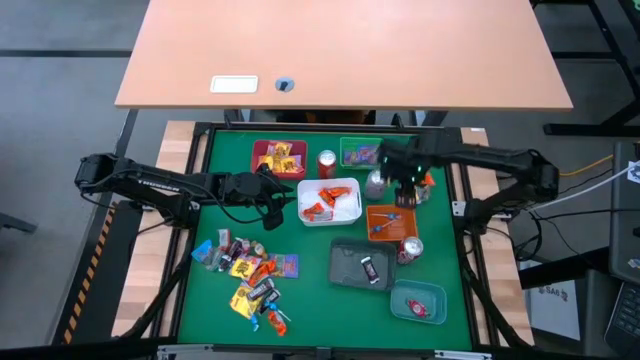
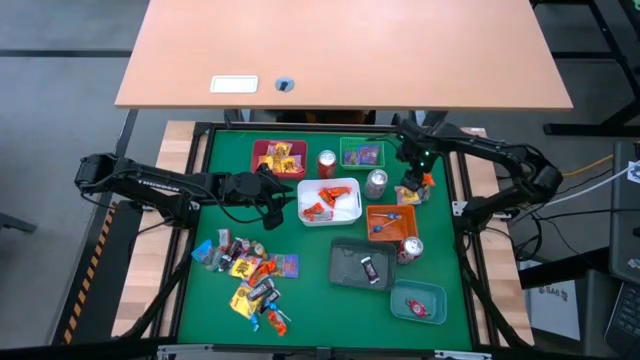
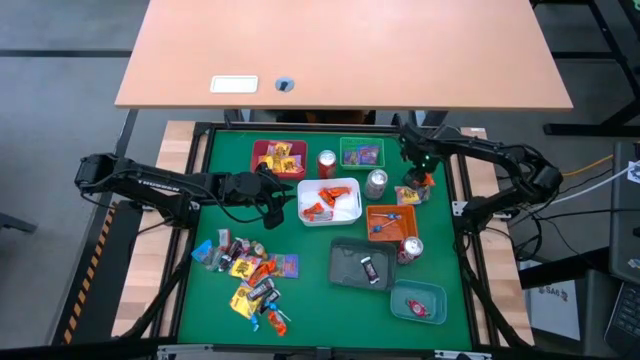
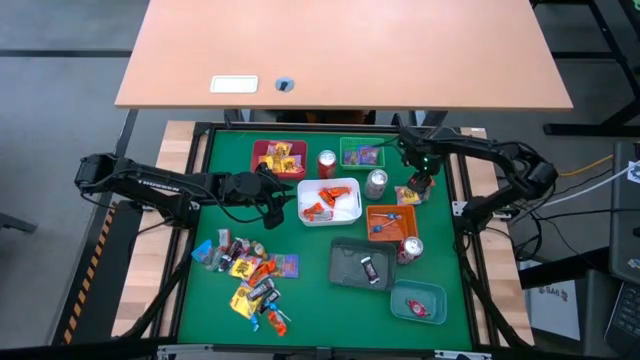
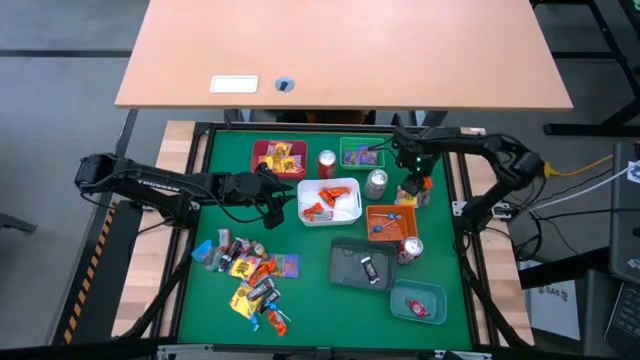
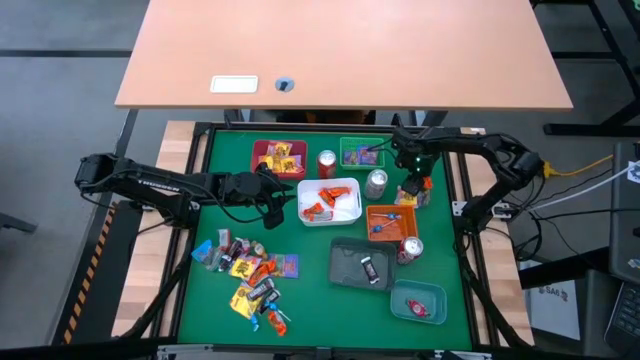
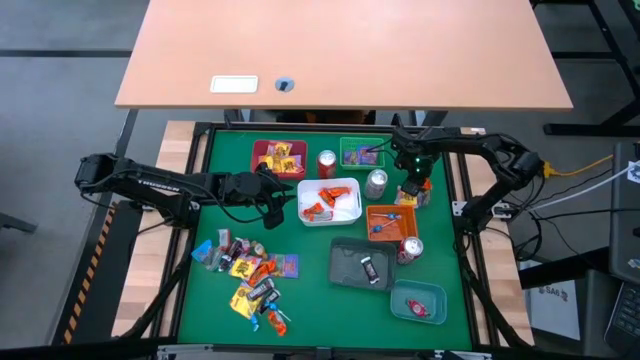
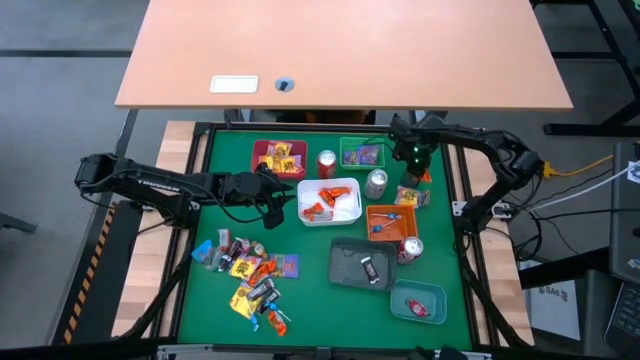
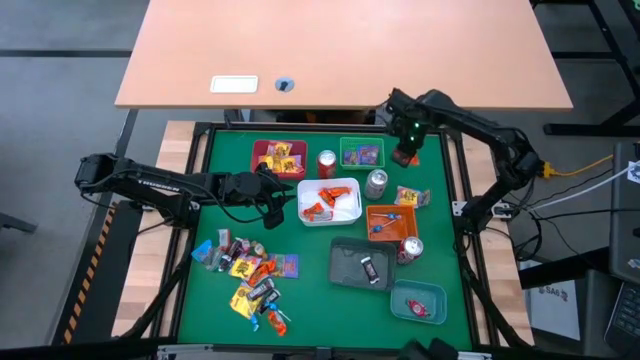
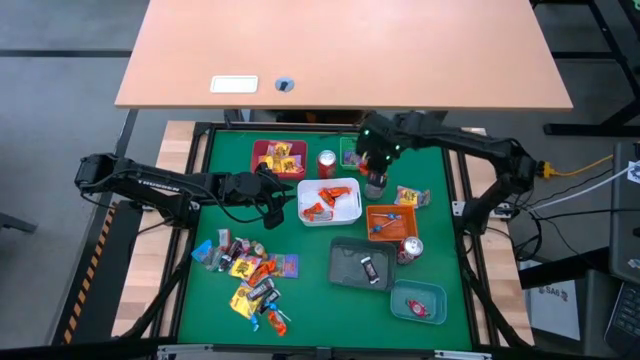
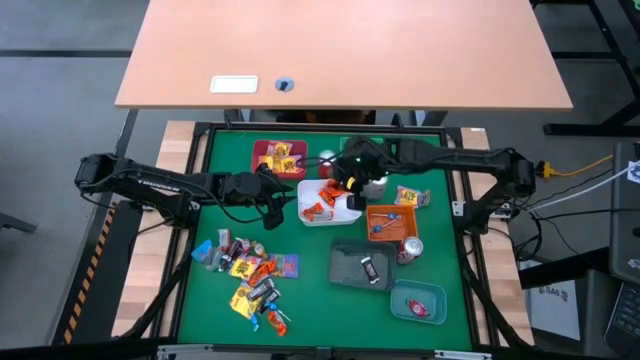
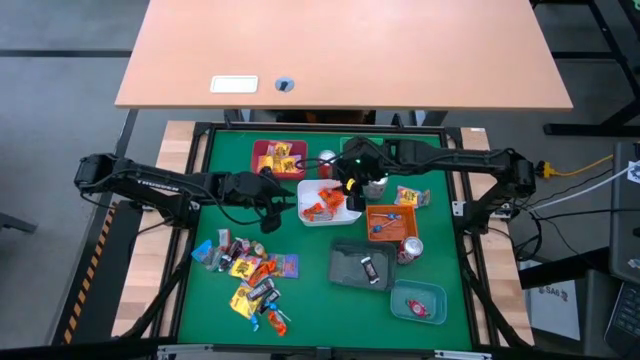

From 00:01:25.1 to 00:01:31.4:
Task: Sort candy
Put the orange candy into the white bin

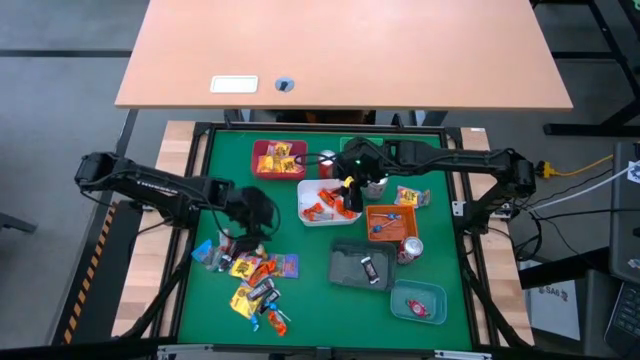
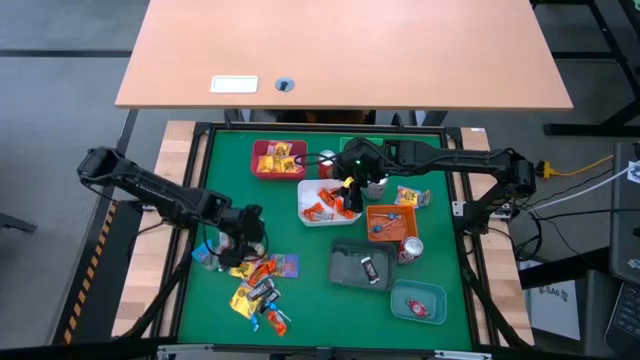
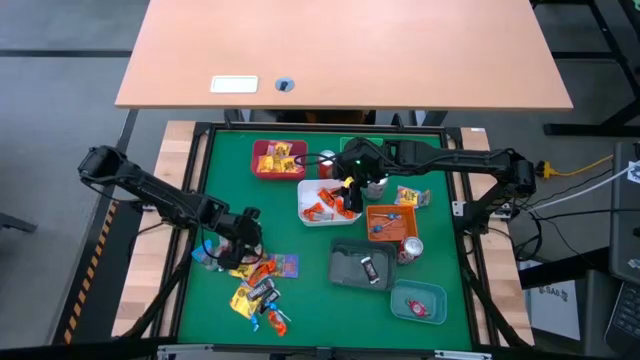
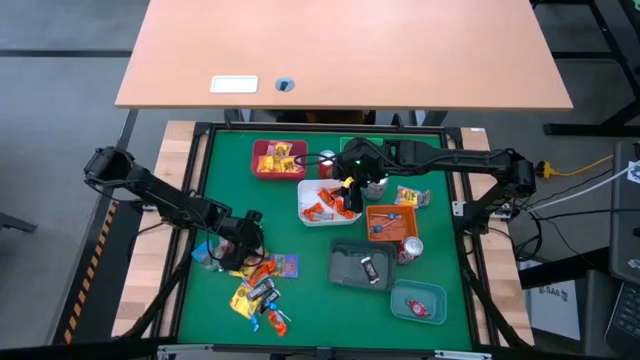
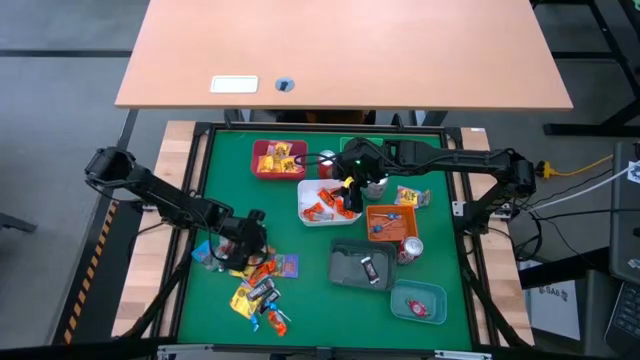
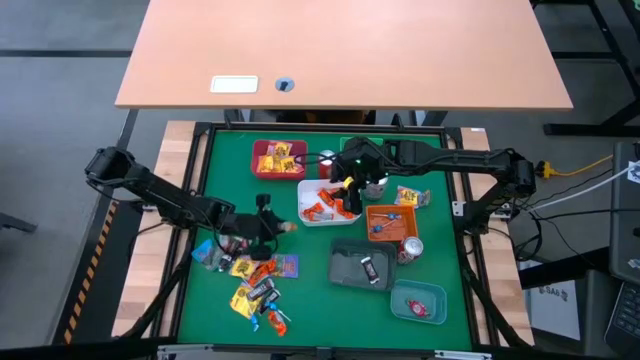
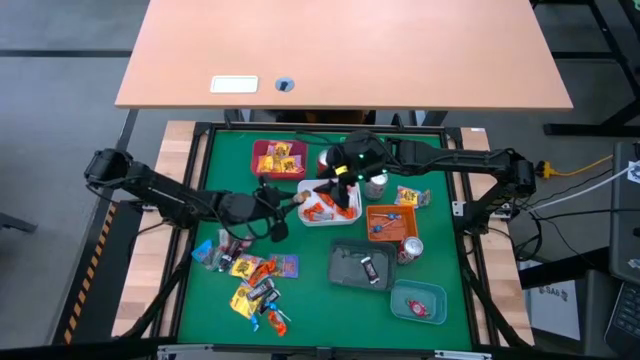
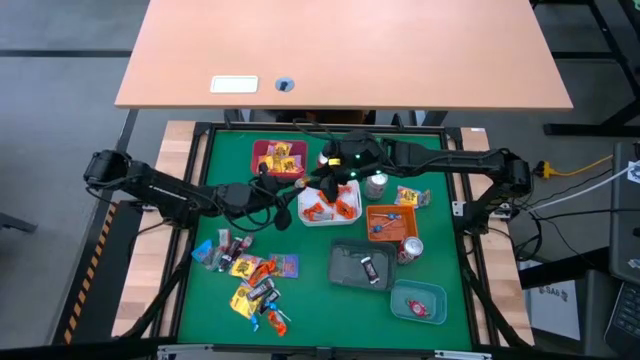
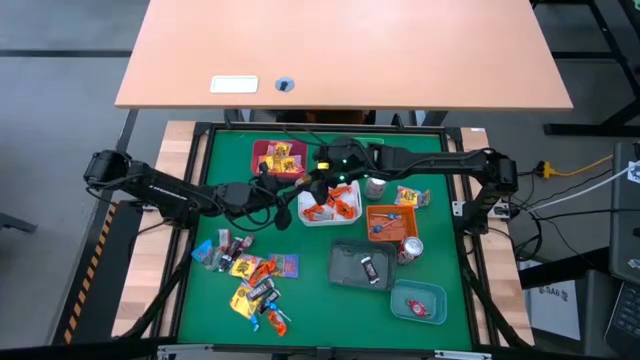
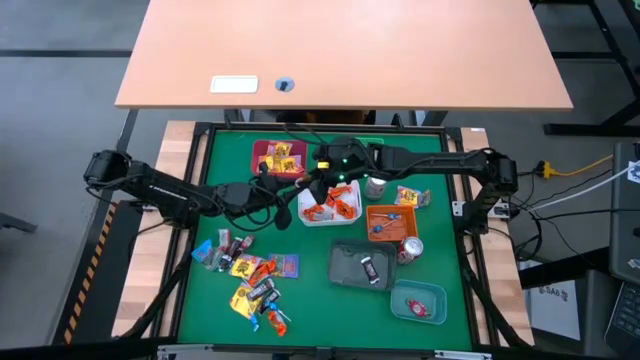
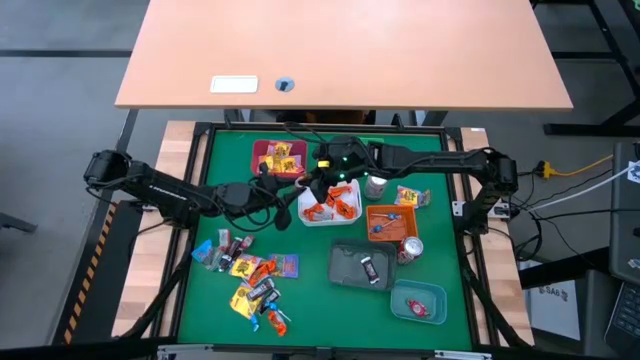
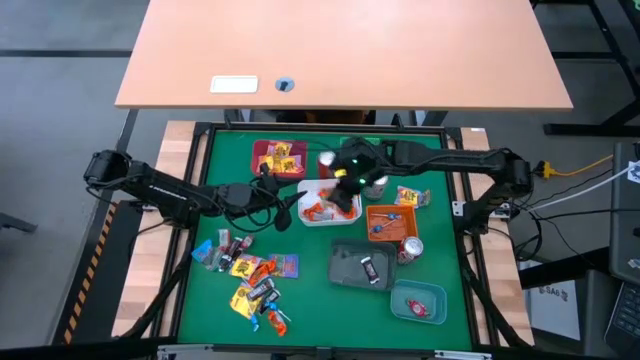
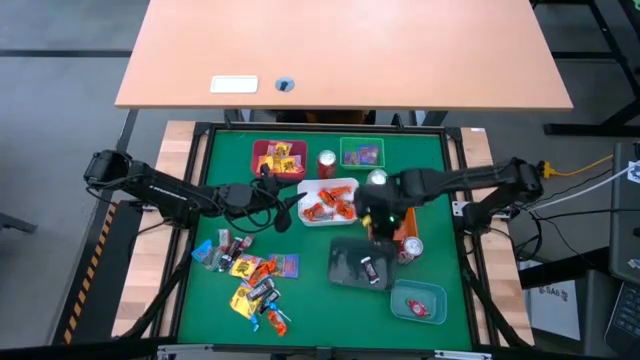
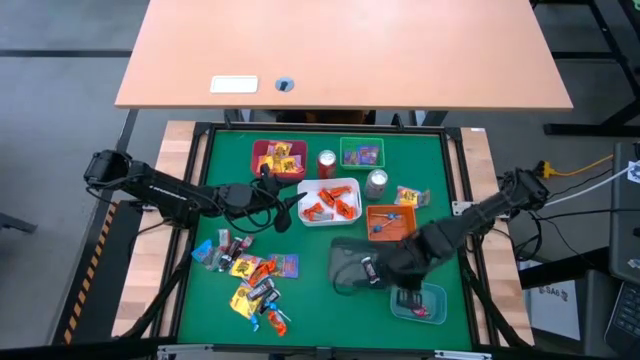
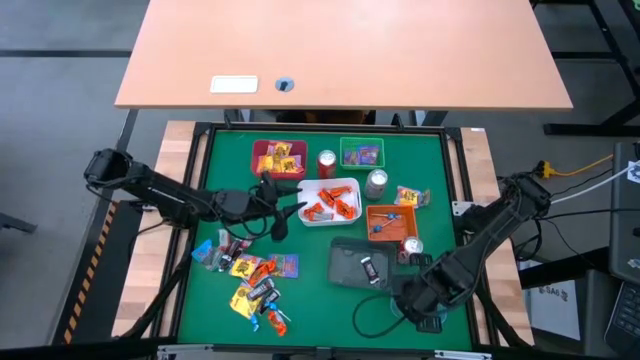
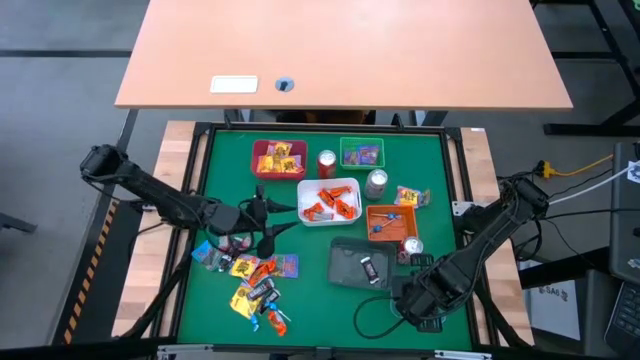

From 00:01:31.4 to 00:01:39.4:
Put the yellow candy into the dark green bin

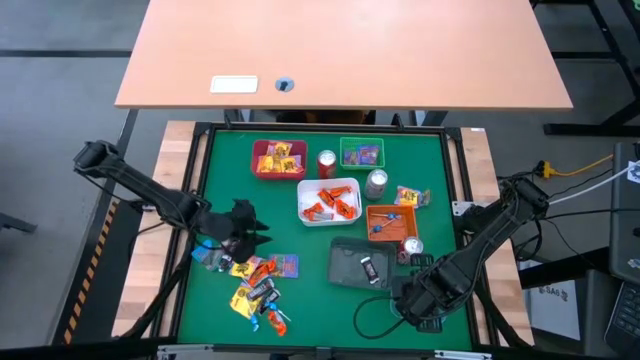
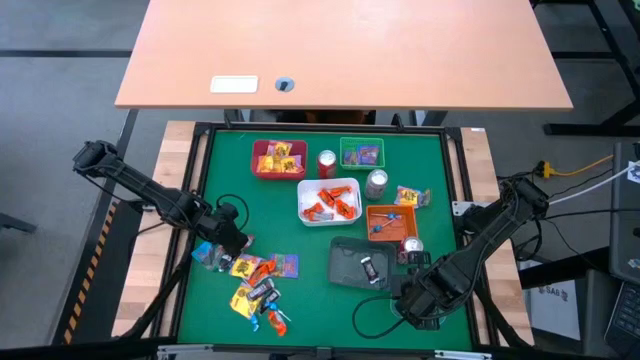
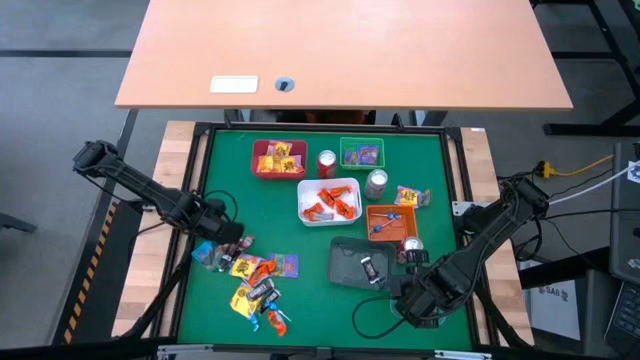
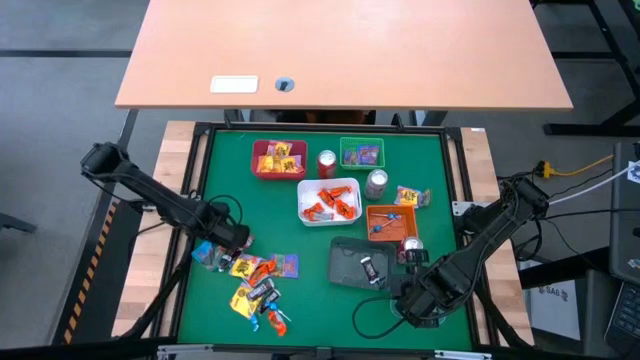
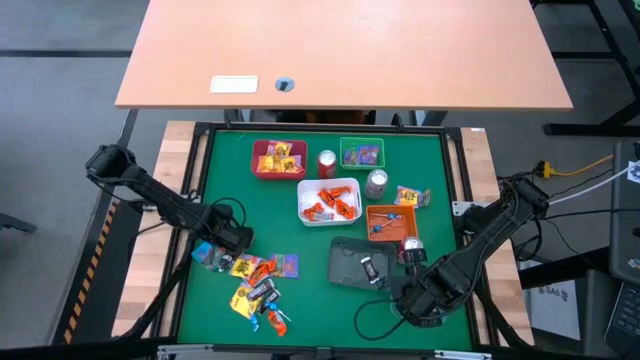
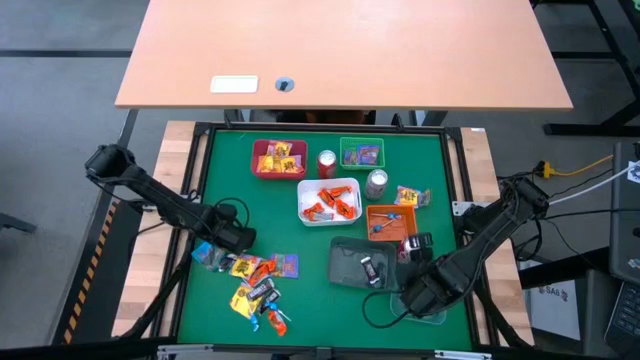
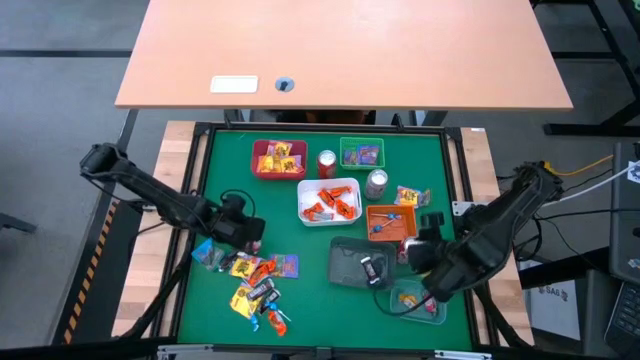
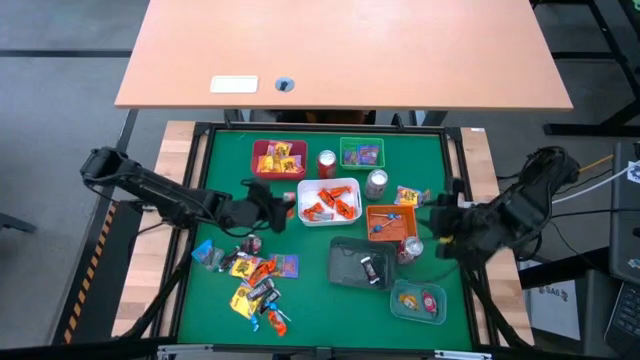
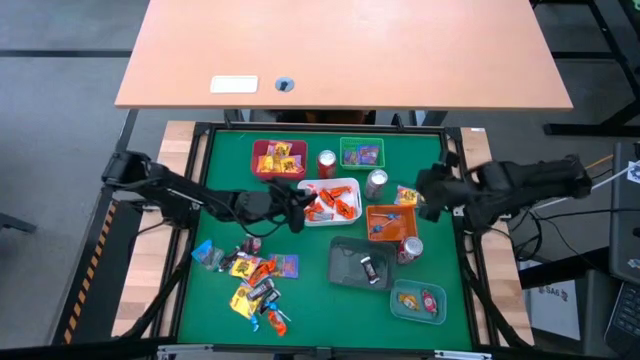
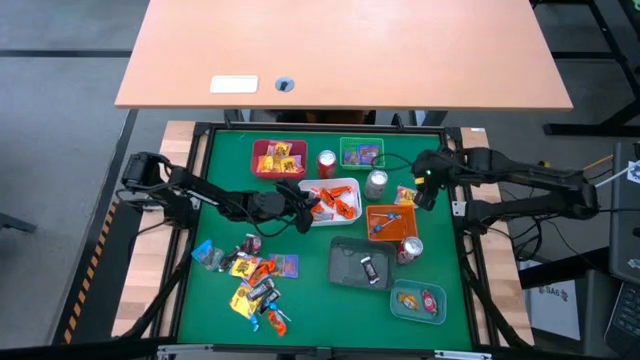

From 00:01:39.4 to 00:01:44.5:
Put the orange candy into the white bin

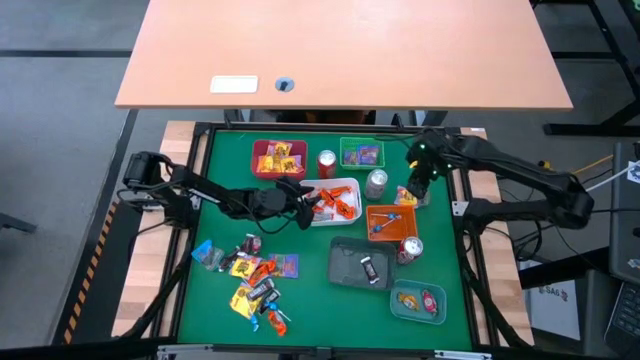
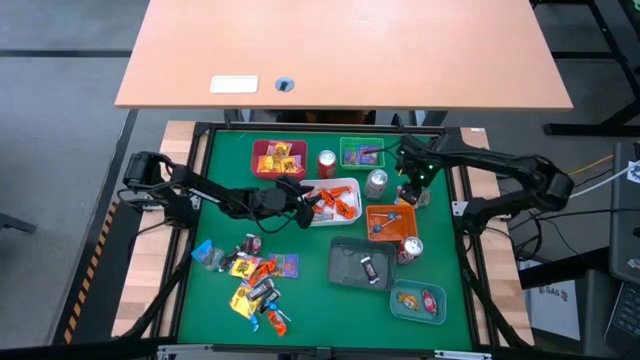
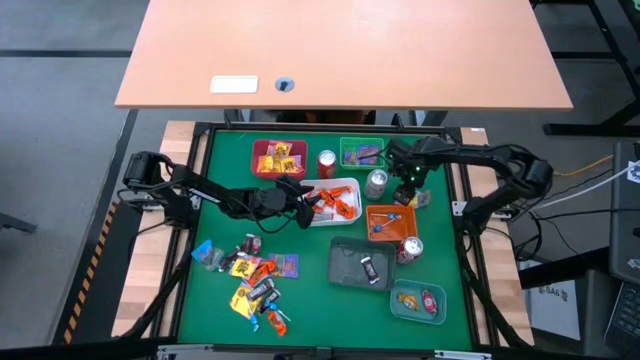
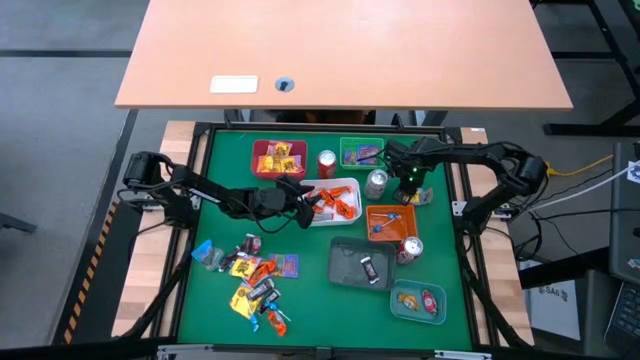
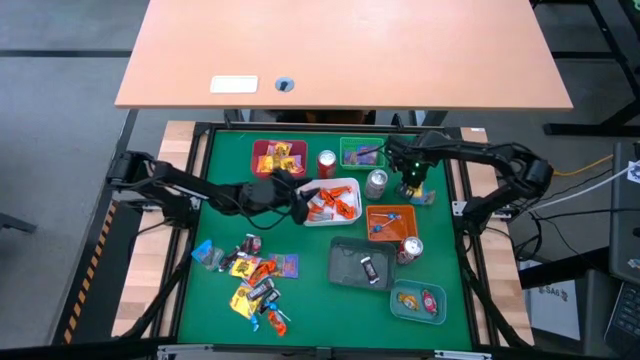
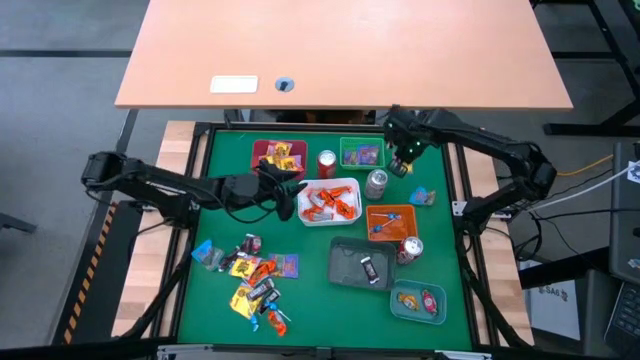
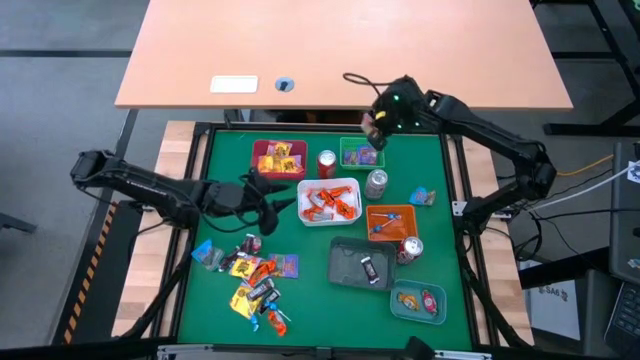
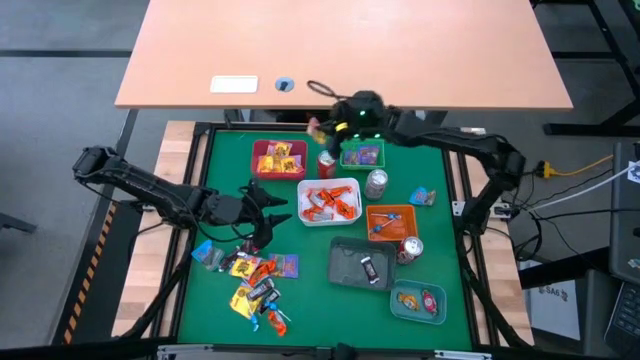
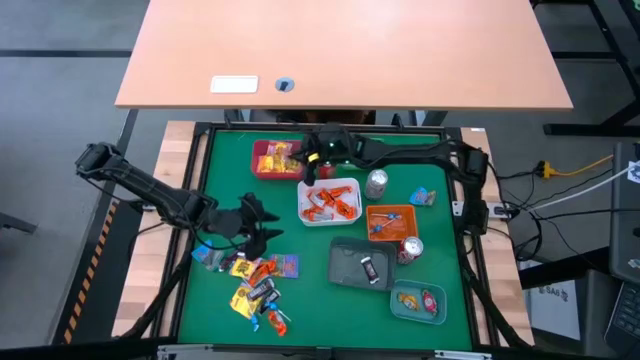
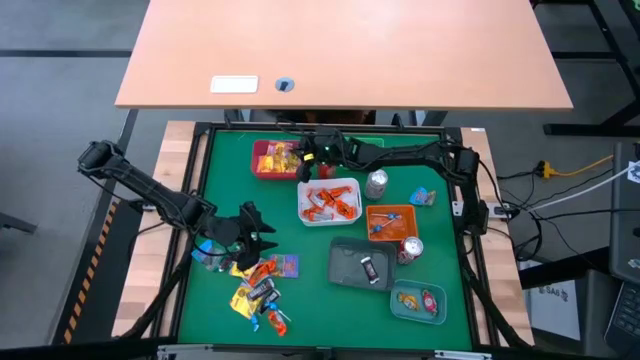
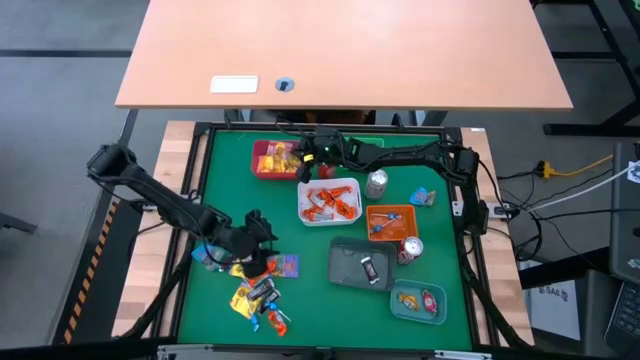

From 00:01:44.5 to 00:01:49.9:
Put the yellow candy into the red bin
